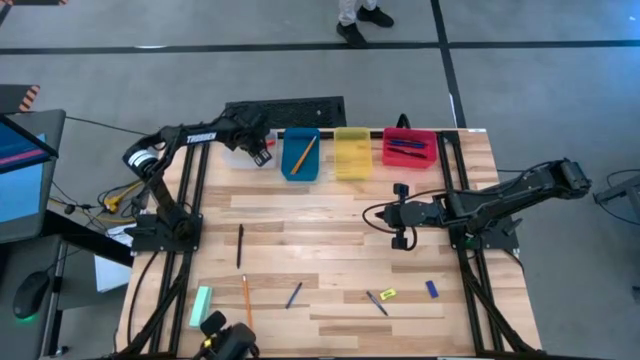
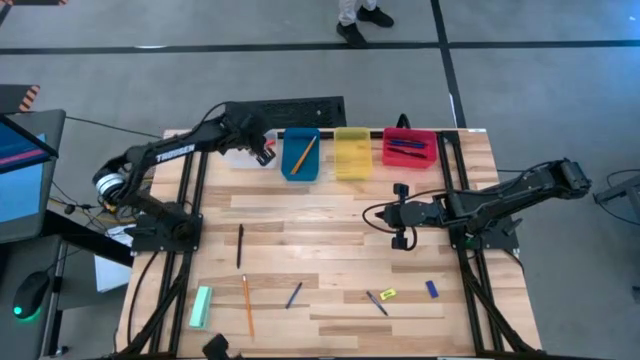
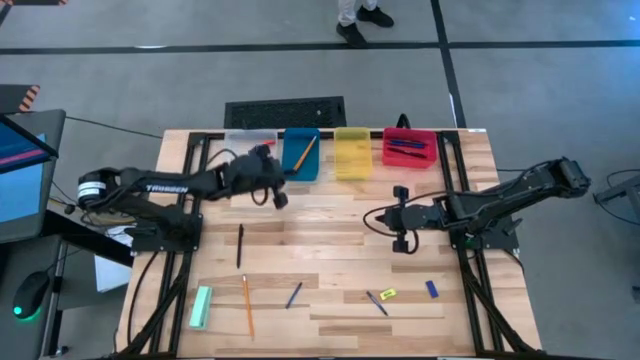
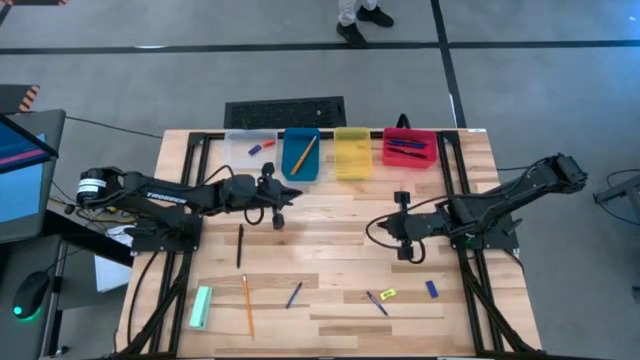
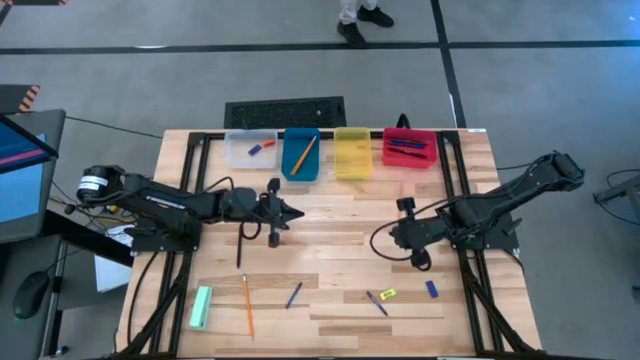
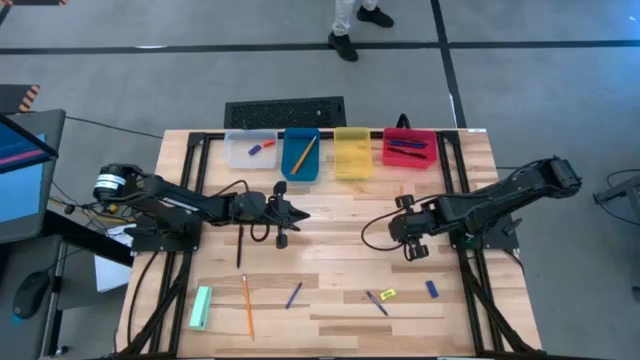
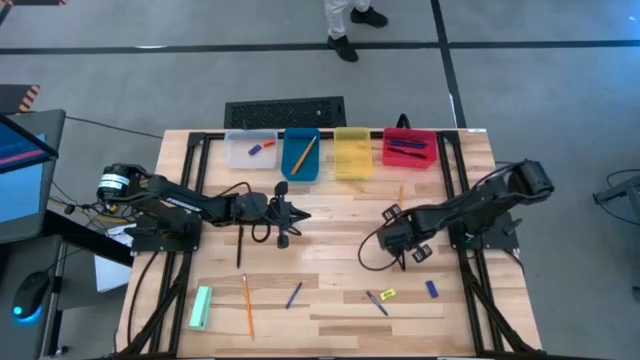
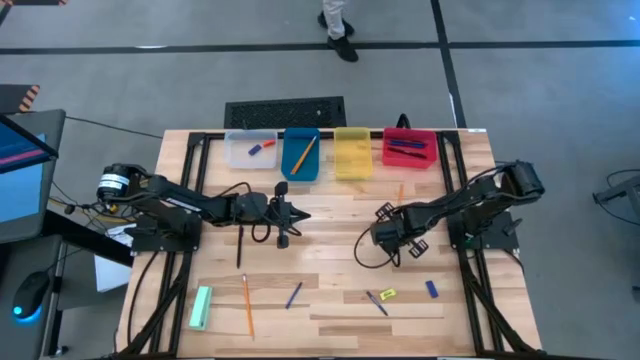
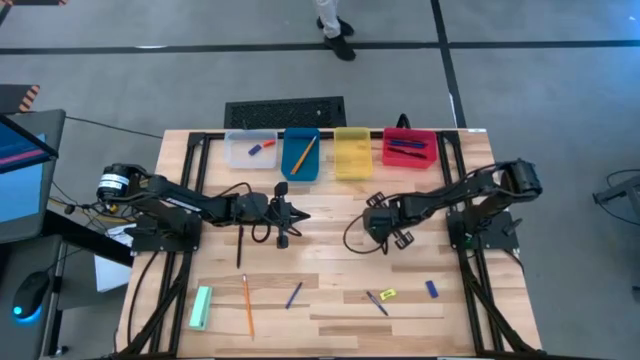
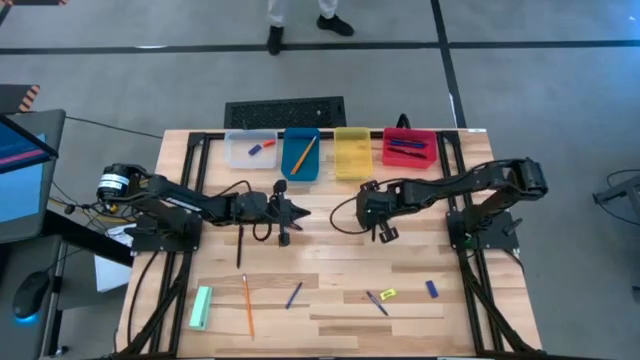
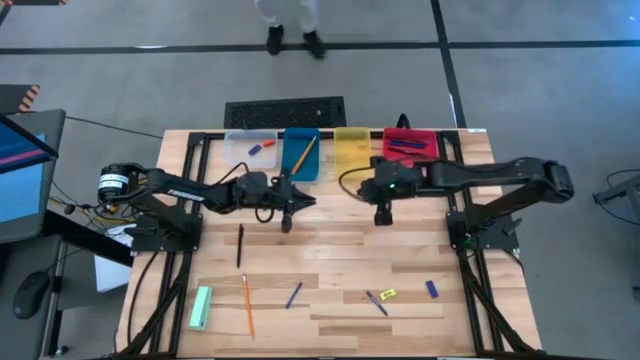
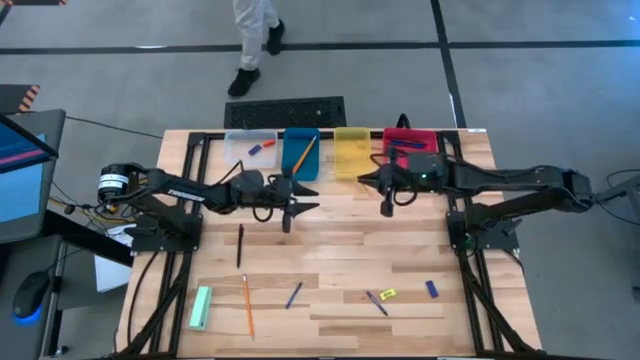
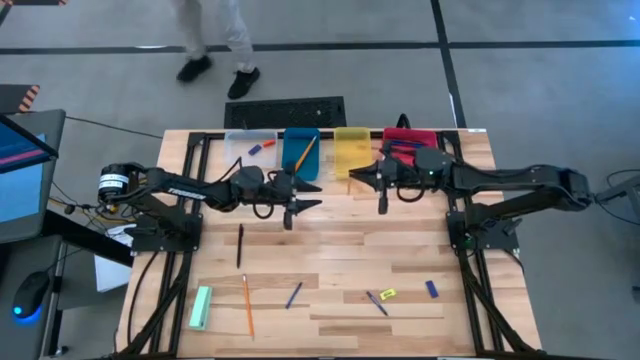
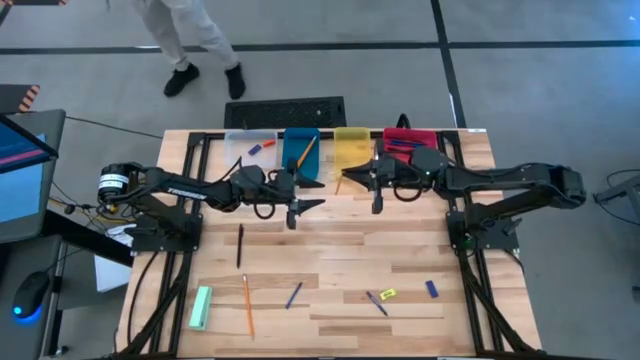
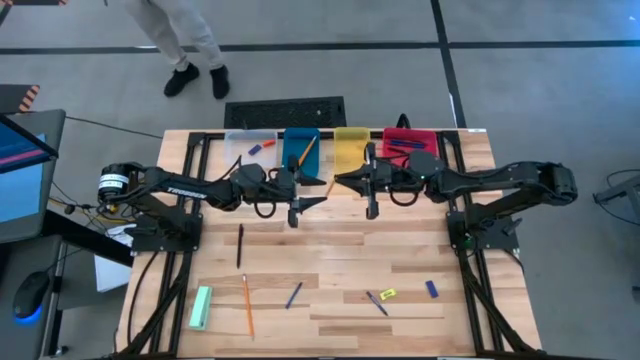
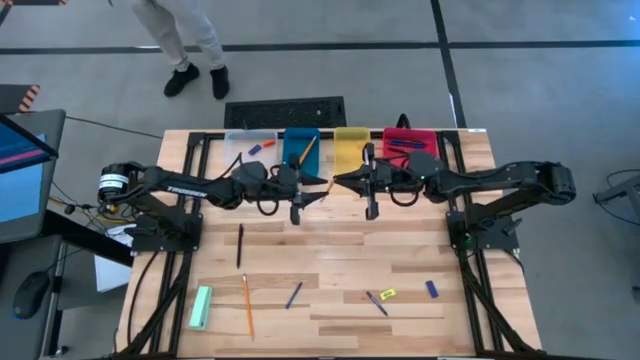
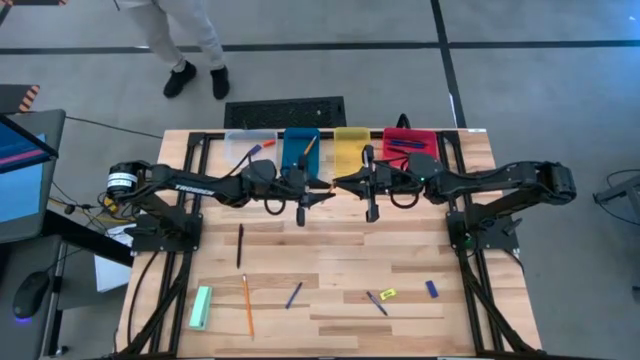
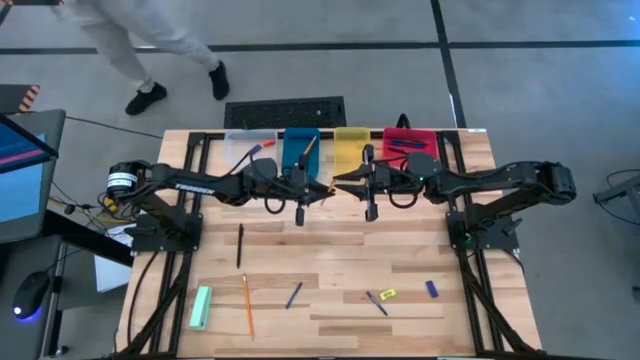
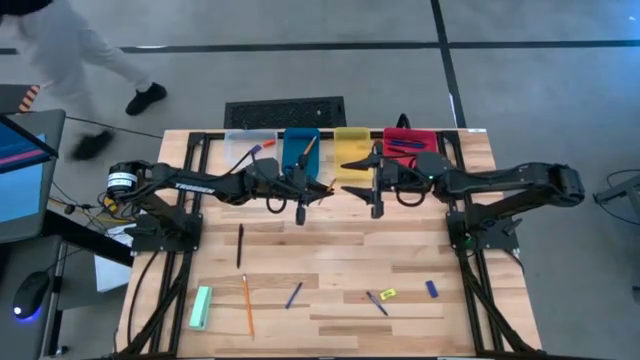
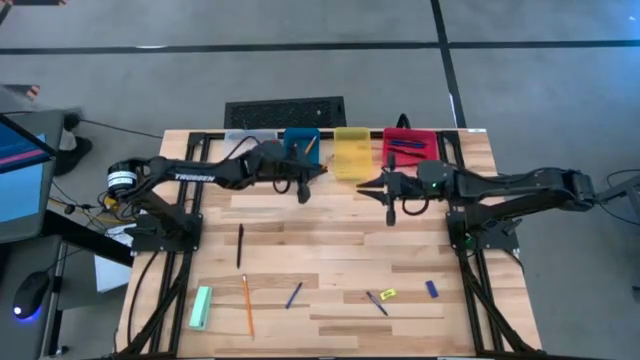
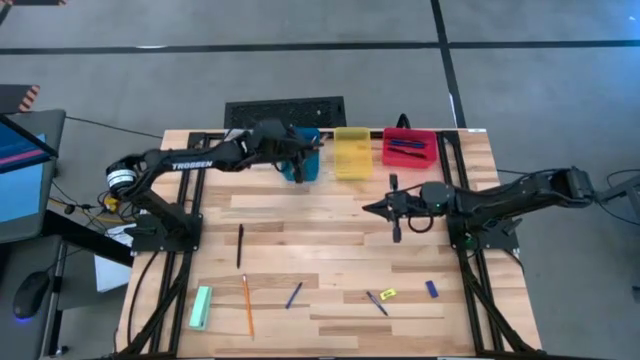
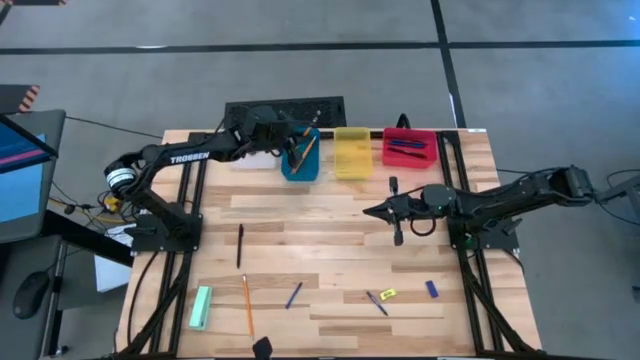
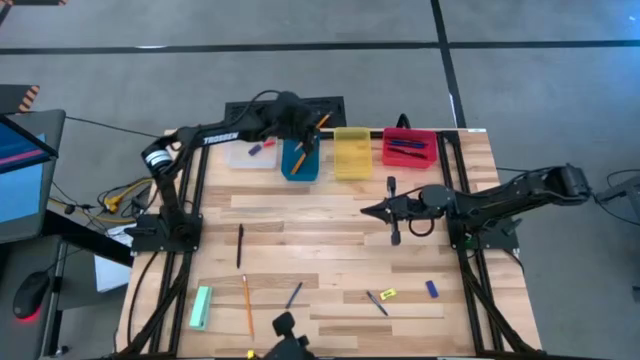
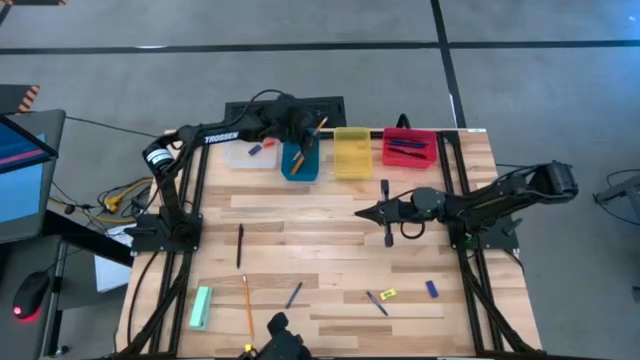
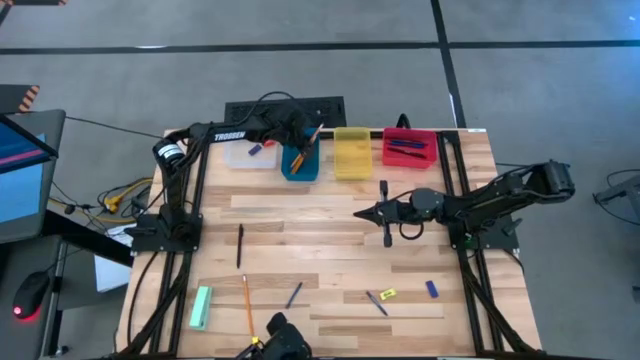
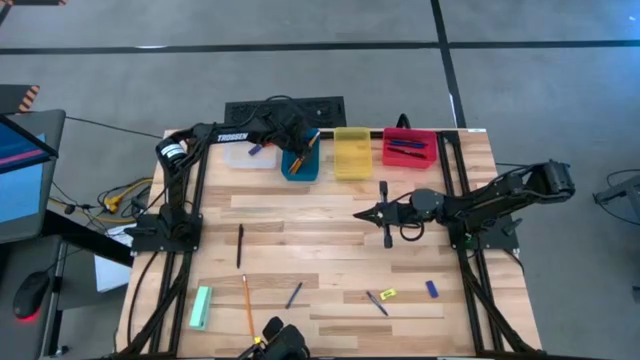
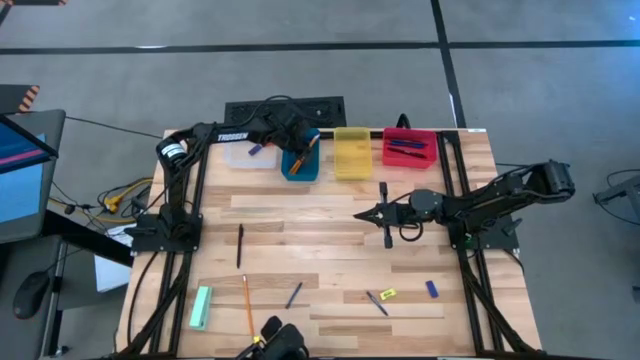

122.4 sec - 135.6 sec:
Task: Sort crayons/erasers/pens/pencils in bins
Put the orange pencil into the blue bin

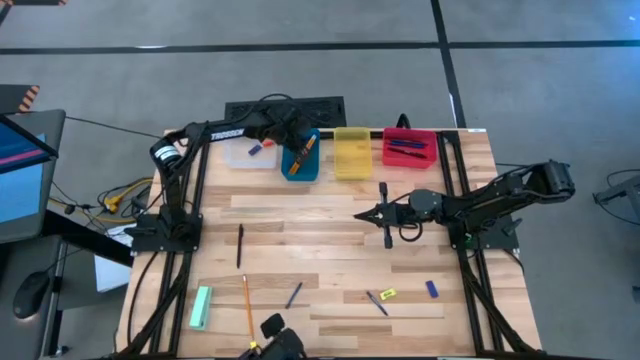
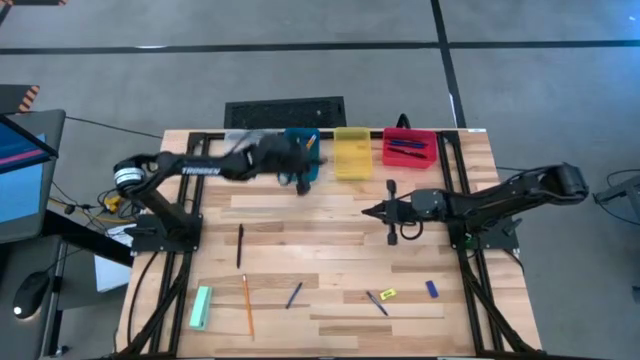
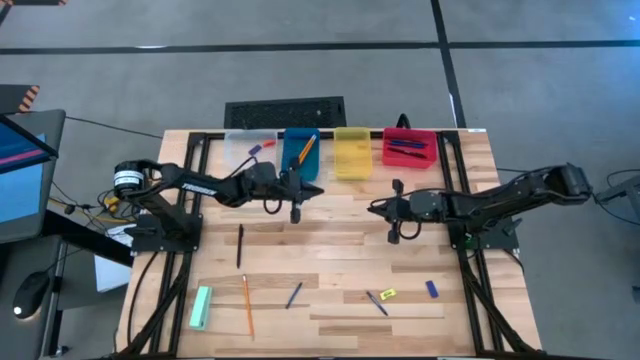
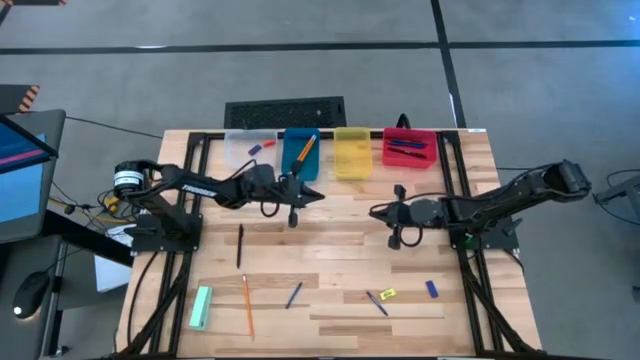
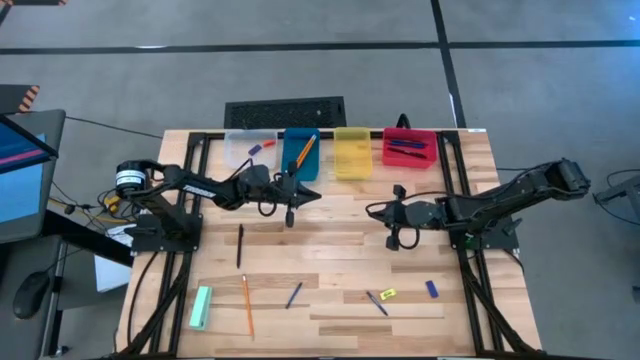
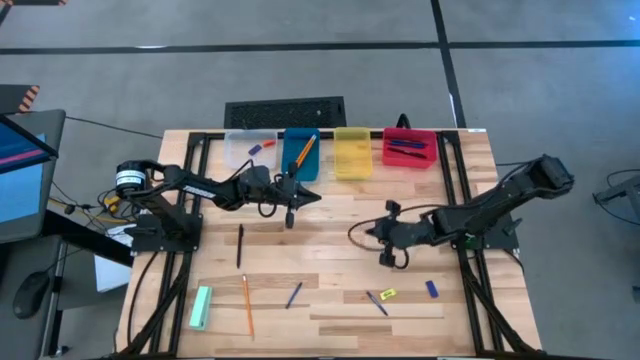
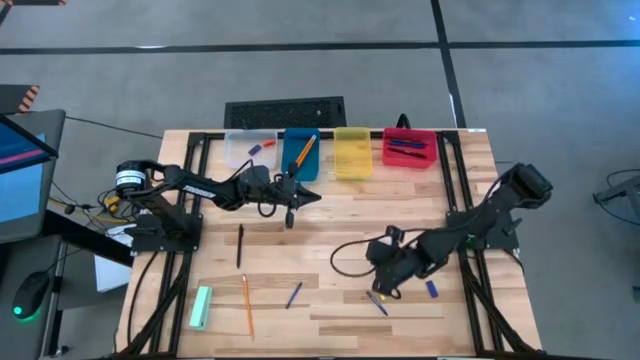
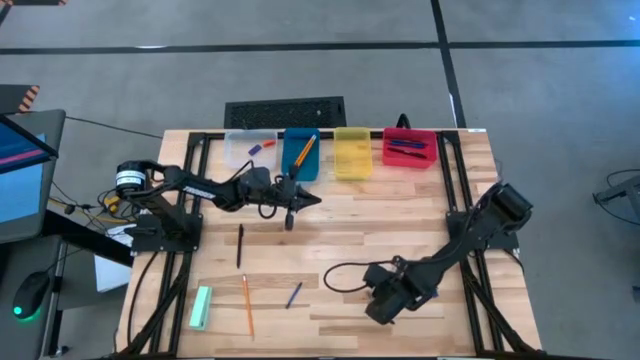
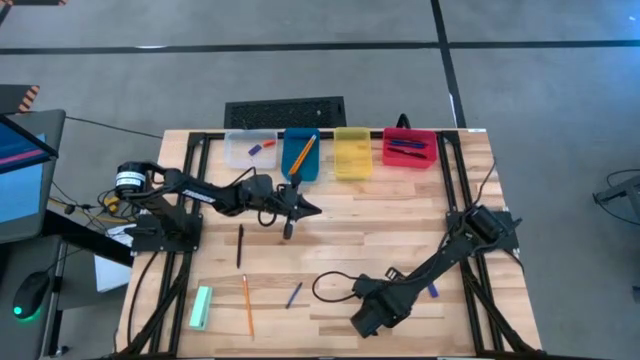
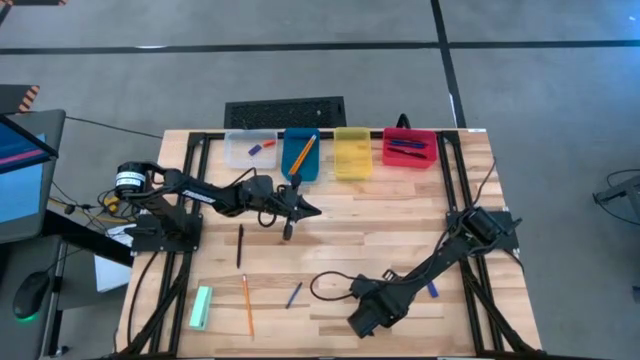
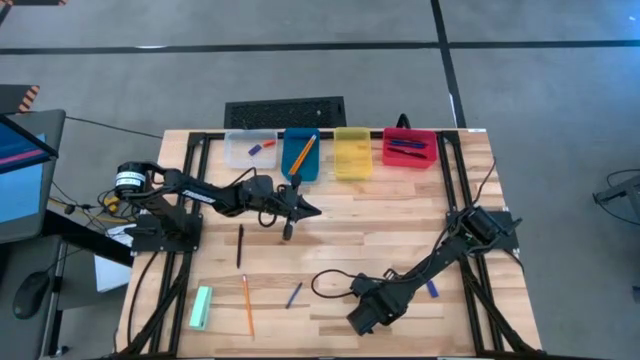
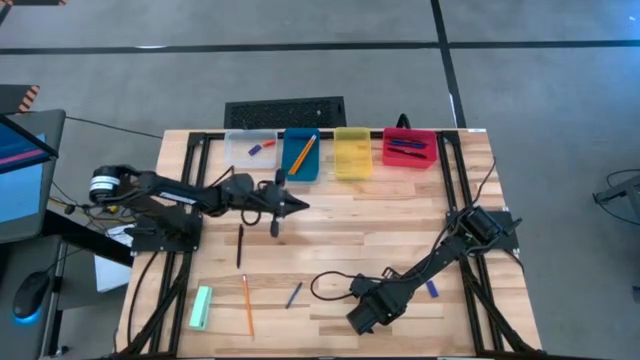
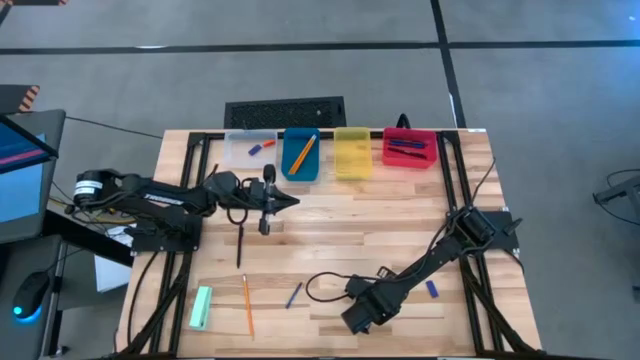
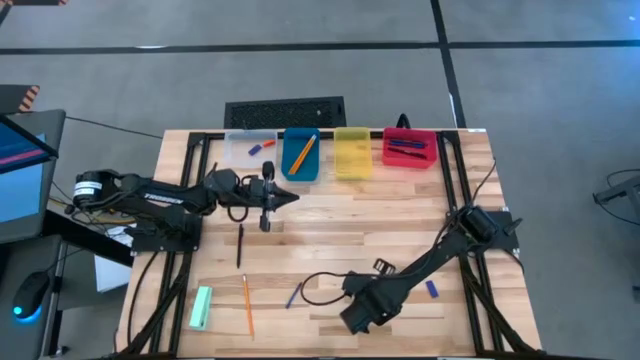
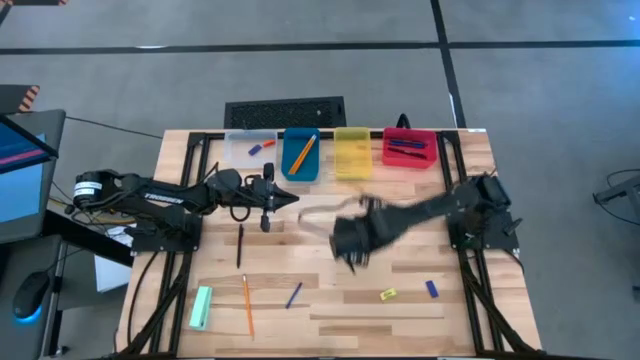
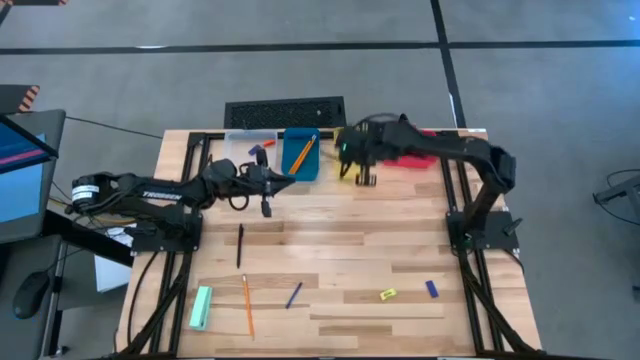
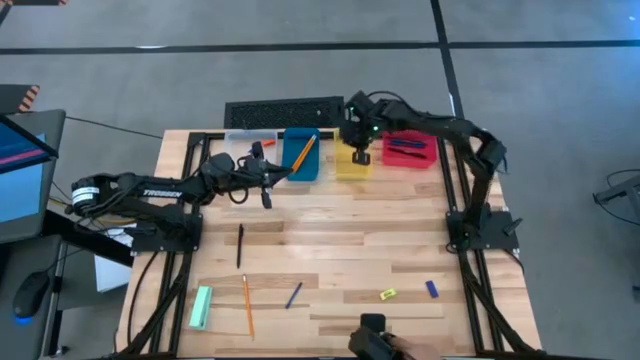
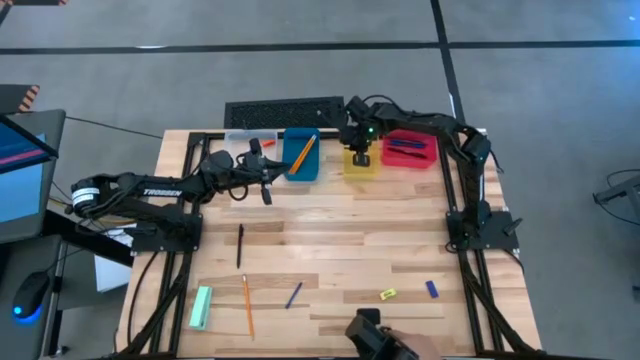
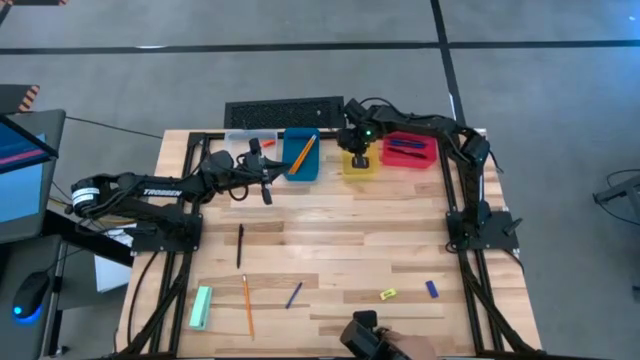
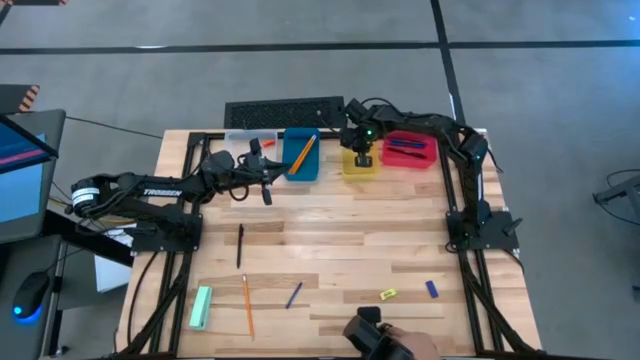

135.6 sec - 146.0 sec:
Put the blue crayon into the yellow bin
